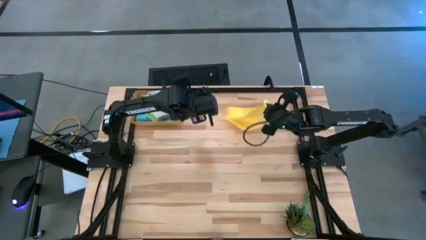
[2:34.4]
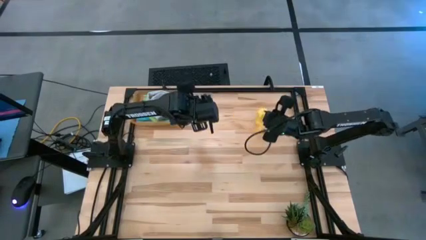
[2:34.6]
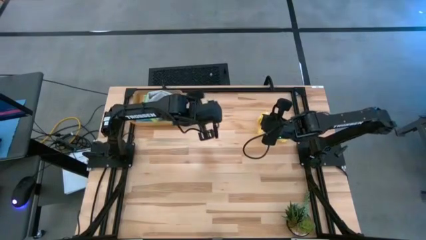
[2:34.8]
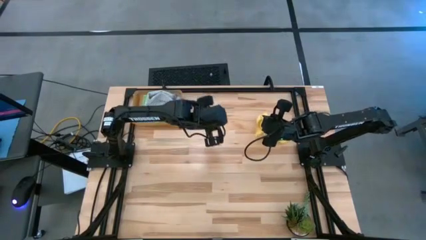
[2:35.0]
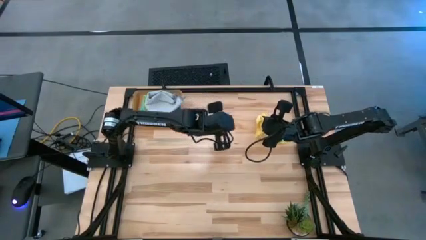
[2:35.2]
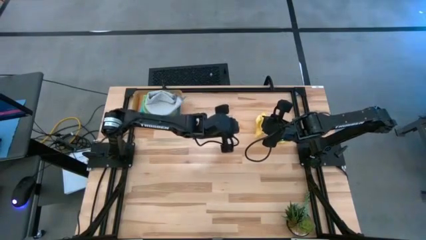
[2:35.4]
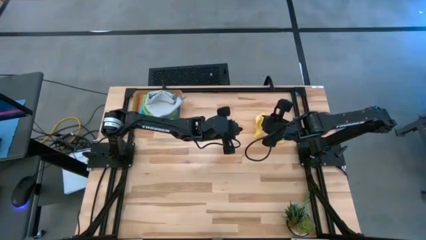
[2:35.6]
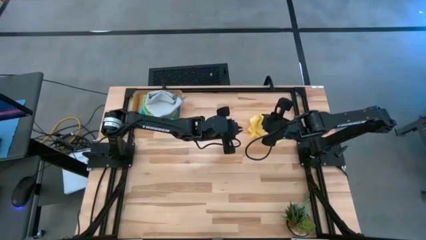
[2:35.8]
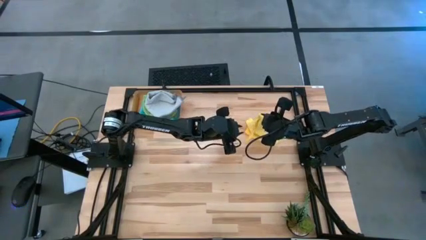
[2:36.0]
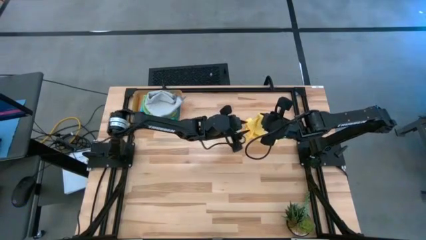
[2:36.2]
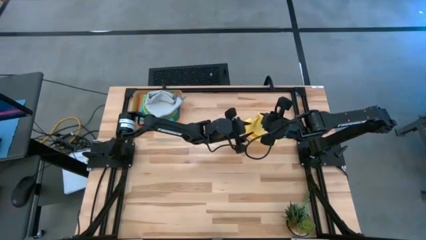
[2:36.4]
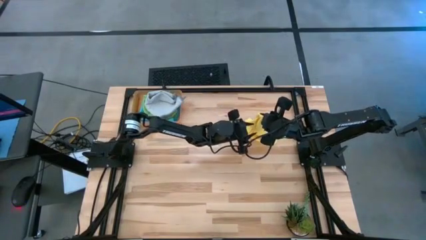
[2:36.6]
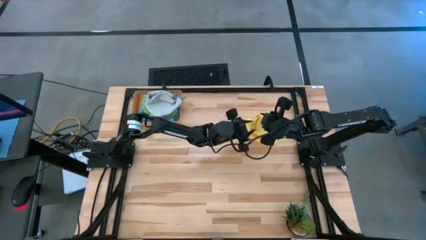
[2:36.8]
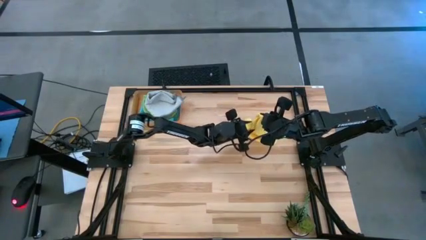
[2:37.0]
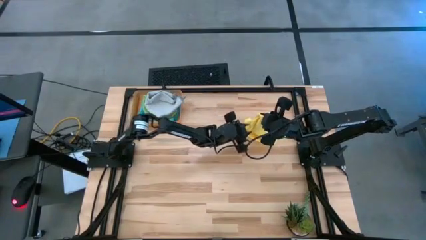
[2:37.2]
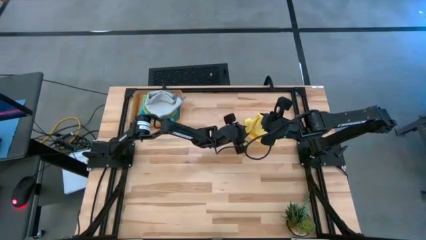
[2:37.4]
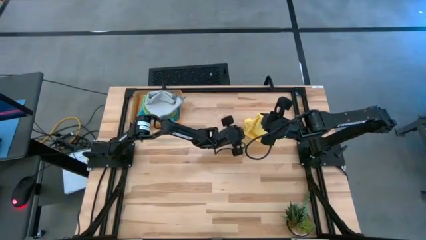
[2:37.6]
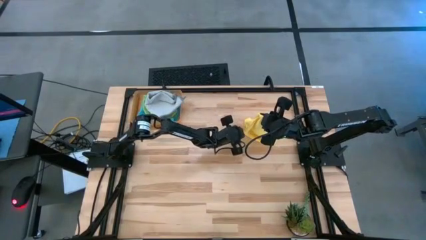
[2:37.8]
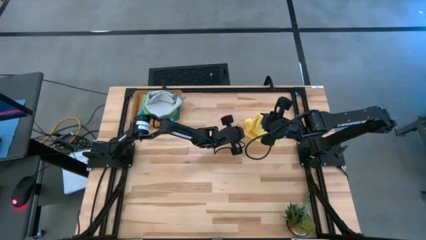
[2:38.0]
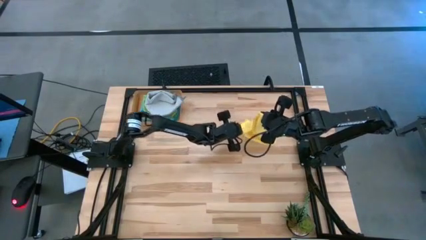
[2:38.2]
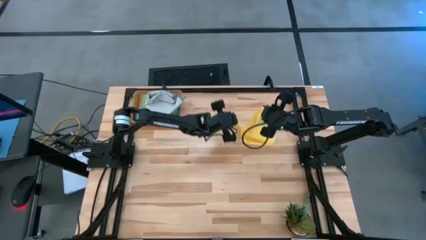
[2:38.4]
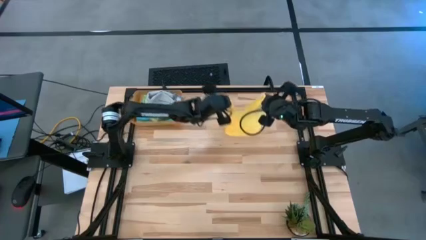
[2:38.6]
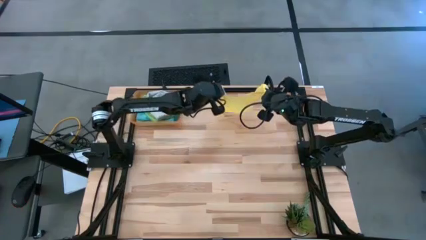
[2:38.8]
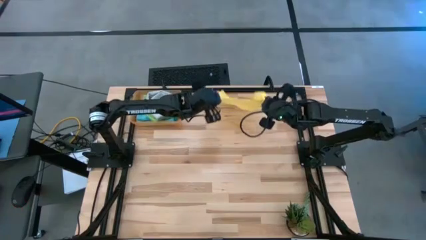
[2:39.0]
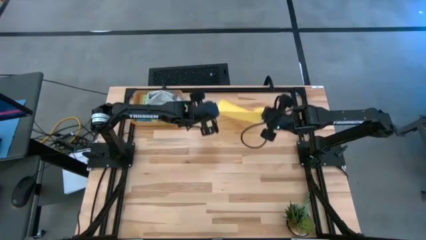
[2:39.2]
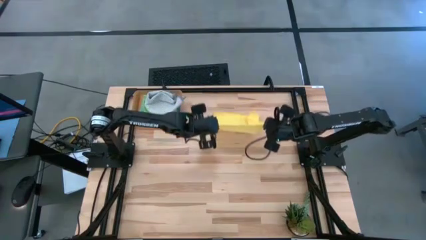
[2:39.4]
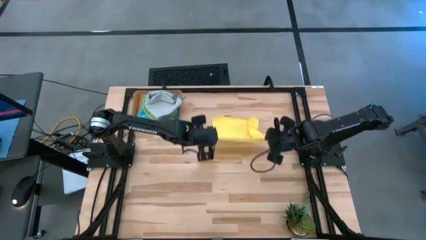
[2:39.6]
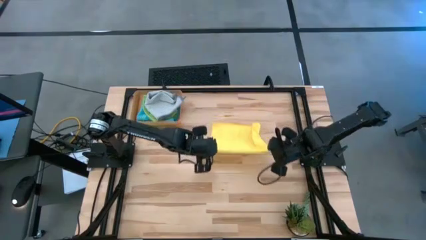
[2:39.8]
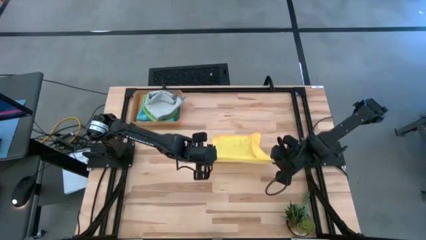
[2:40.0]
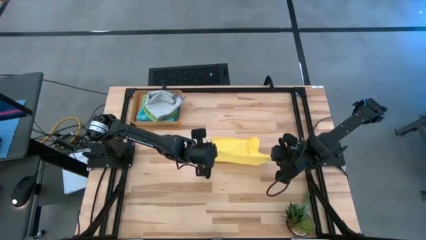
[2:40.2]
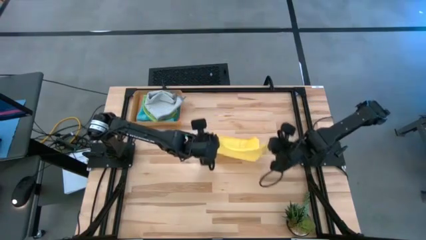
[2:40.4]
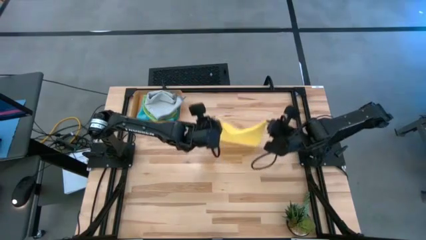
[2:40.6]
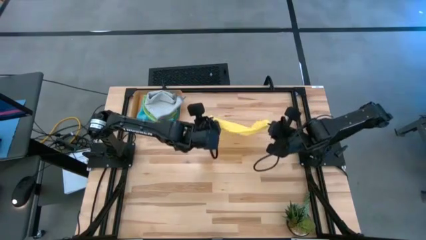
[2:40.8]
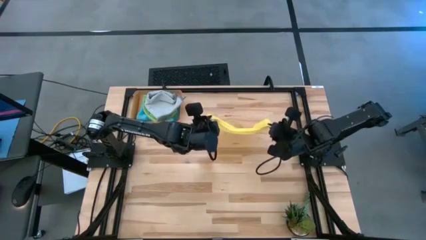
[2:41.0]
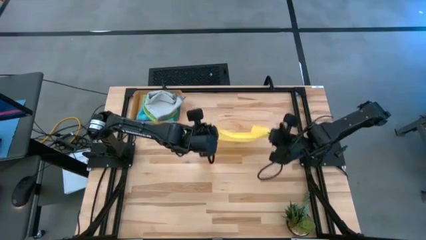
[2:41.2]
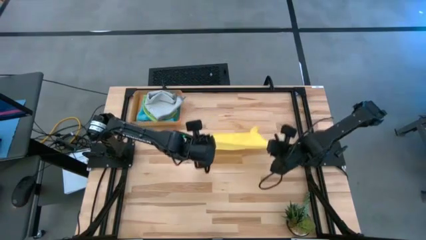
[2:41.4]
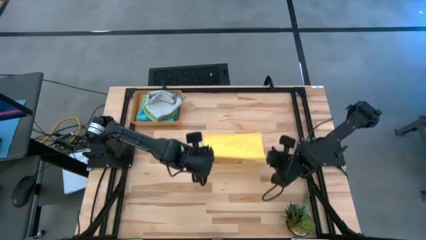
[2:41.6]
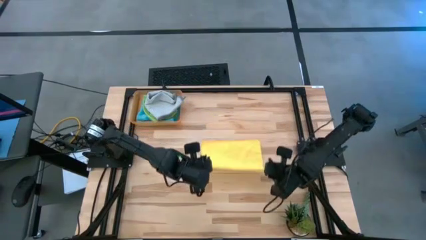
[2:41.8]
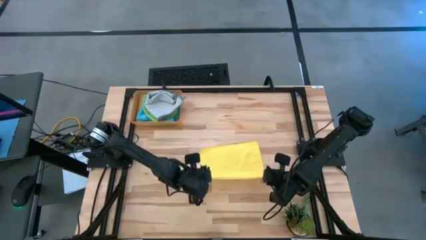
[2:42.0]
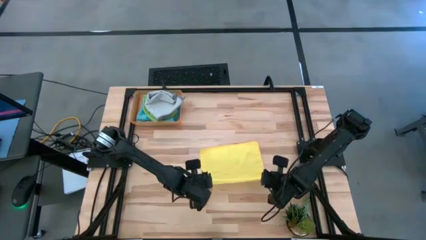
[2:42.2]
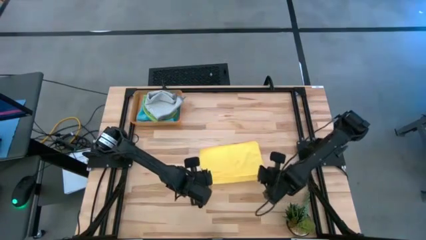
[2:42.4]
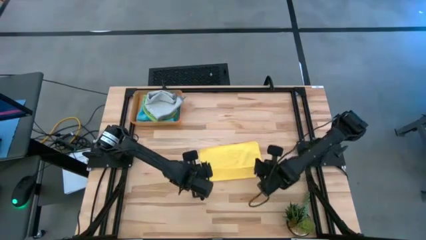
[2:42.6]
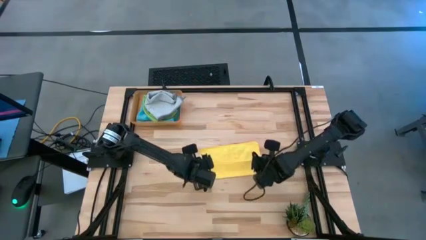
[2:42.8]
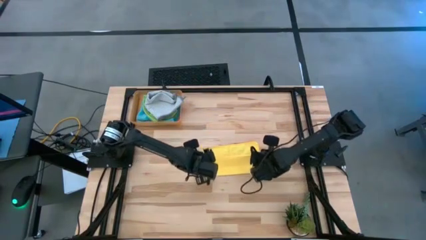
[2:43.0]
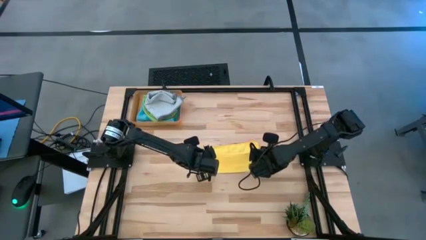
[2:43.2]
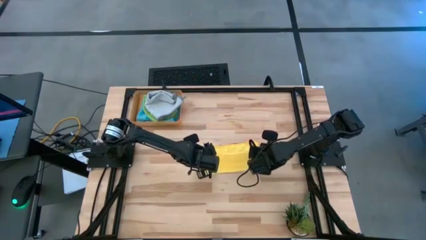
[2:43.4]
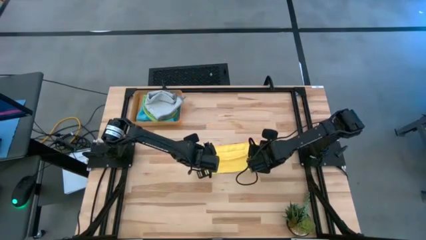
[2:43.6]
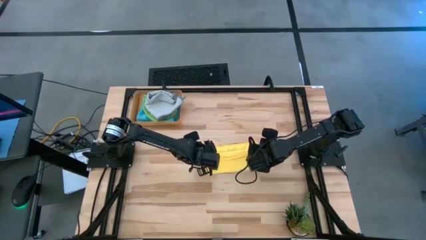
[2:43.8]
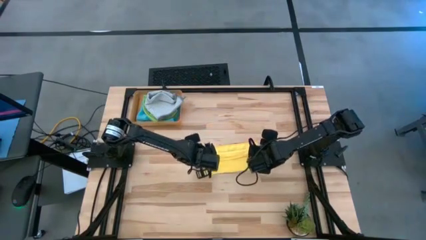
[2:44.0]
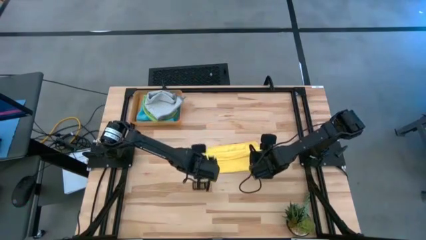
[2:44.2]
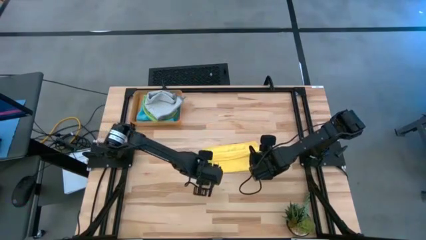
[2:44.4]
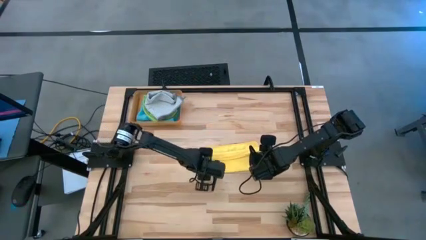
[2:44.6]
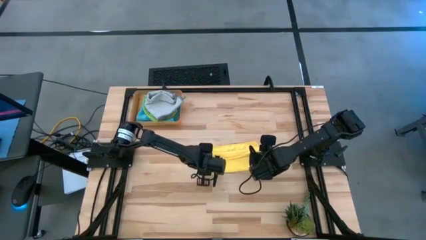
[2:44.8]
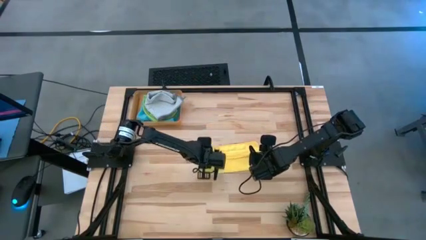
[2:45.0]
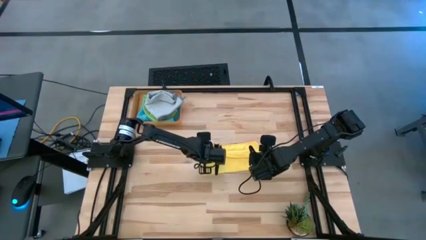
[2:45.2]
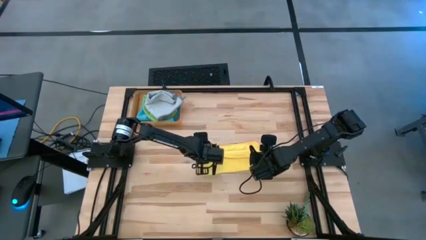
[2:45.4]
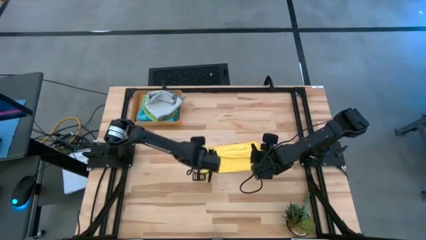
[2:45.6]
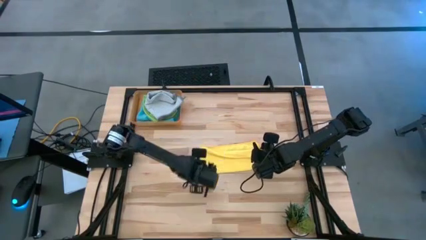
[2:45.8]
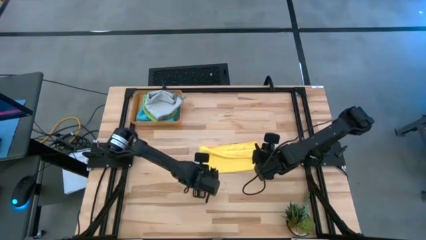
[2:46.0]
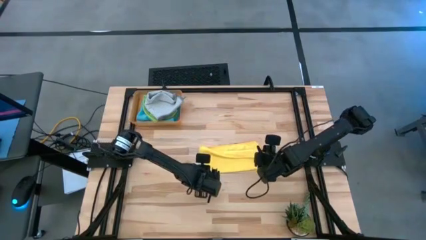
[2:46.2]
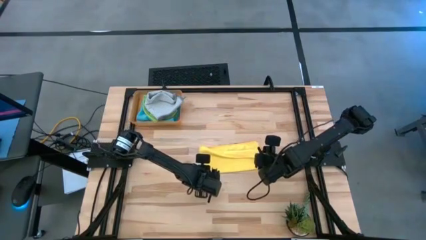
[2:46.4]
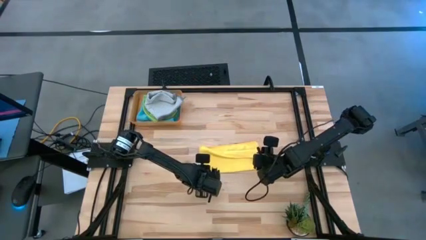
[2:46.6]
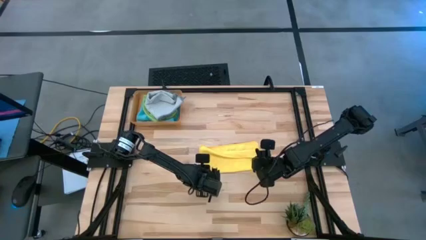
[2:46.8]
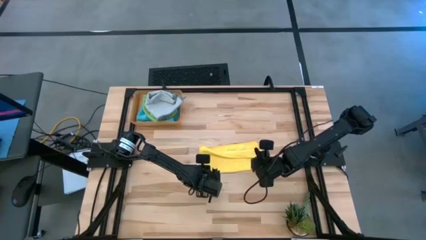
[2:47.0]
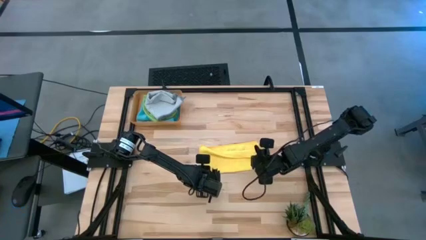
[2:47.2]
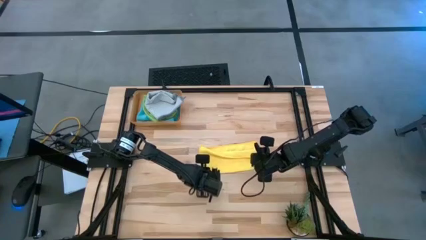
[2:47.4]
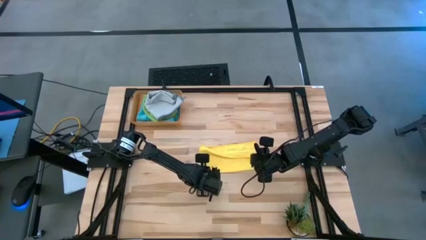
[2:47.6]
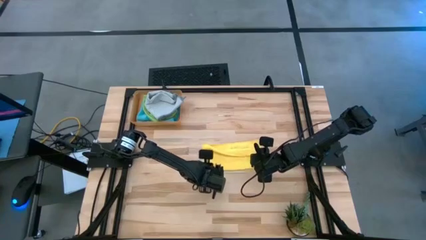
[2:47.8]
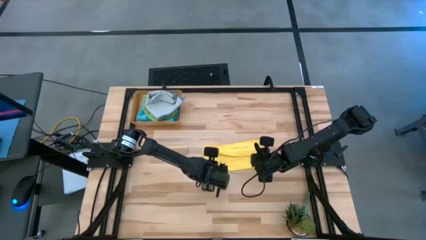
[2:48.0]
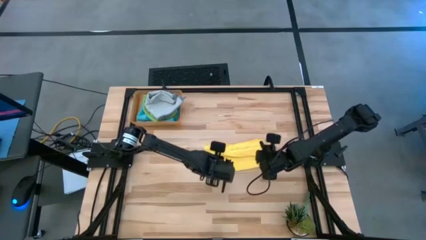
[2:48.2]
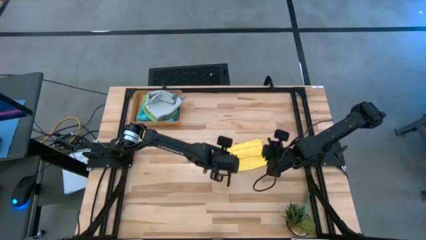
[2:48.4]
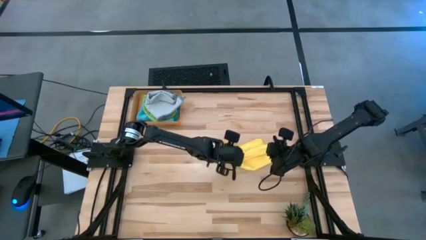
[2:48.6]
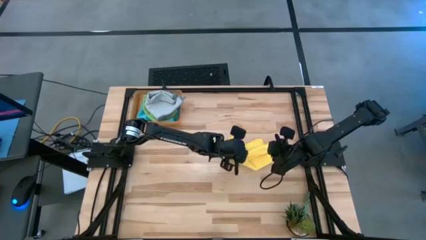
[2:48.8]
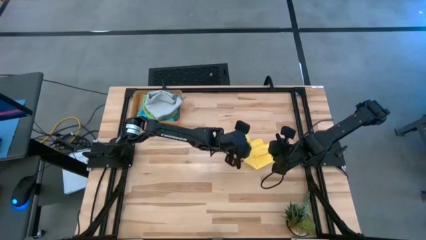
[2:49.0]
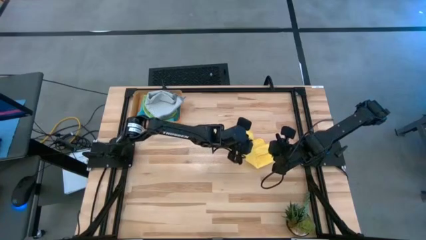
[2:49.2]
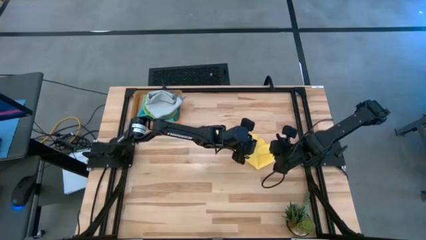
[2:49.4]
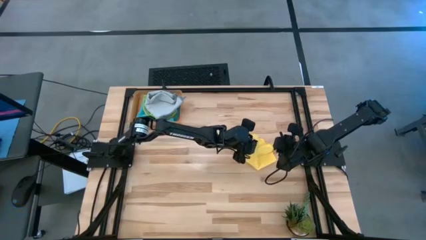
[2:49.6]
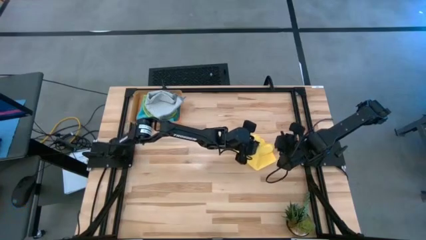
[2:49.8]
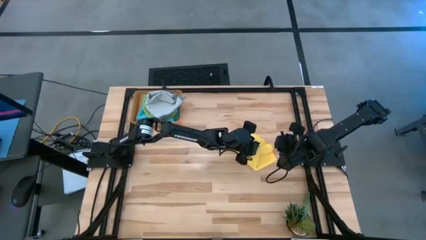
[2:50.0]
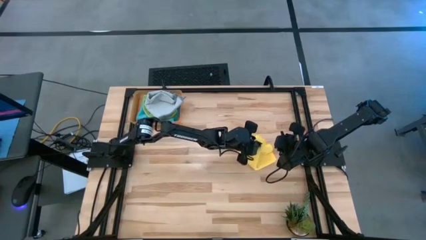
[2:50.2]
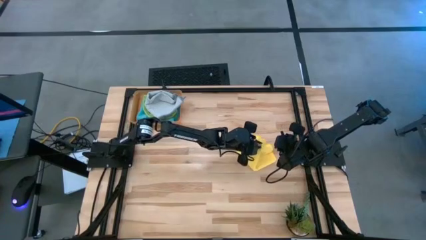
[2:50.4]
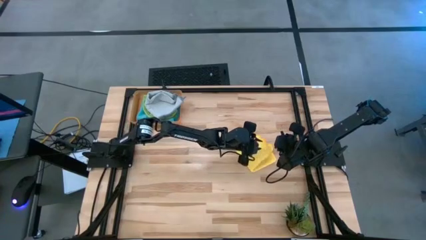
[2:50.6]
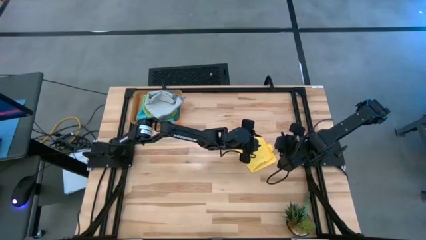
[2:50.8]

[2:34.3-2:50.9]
Task: Fold microfiber towels
Fold the yellow microfiber cloth
